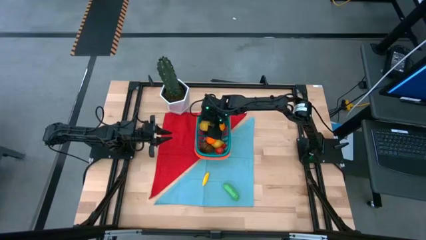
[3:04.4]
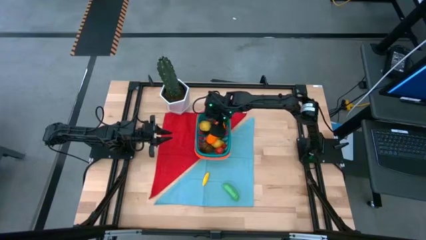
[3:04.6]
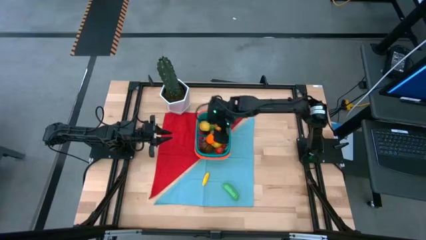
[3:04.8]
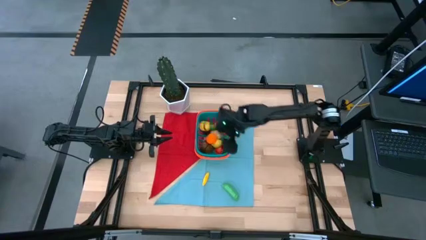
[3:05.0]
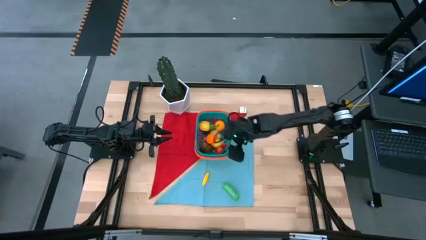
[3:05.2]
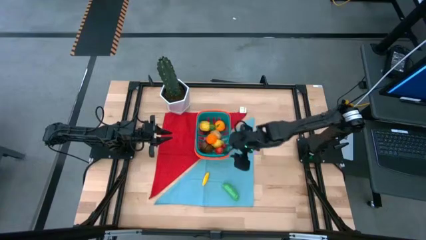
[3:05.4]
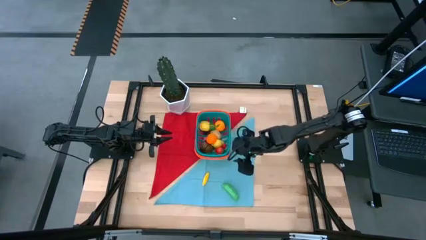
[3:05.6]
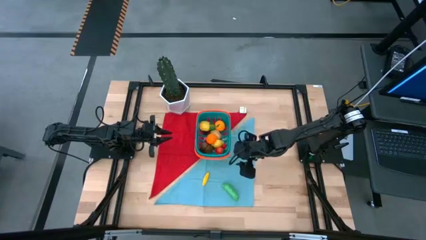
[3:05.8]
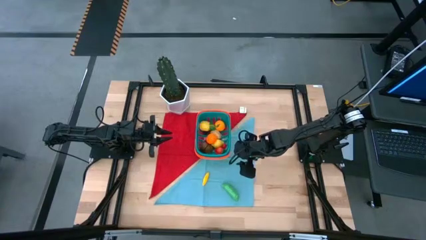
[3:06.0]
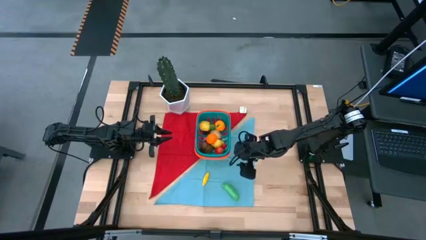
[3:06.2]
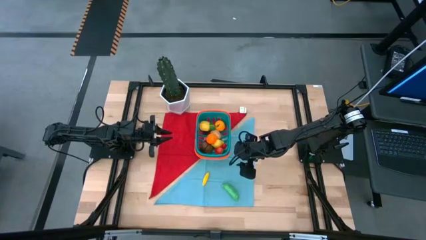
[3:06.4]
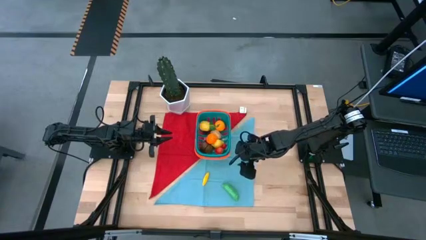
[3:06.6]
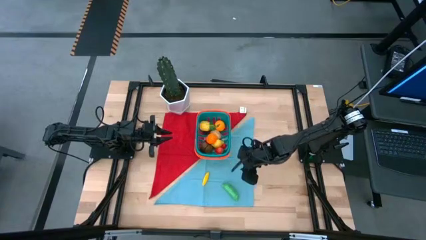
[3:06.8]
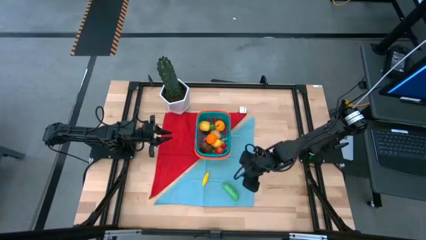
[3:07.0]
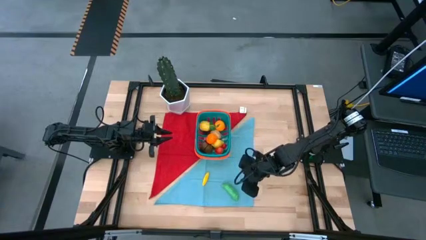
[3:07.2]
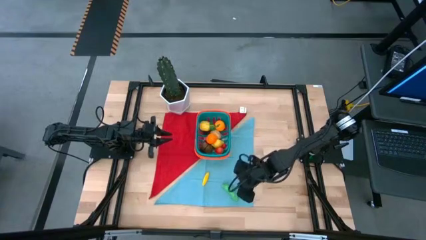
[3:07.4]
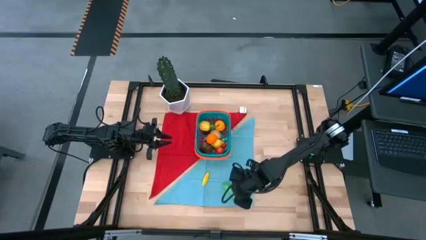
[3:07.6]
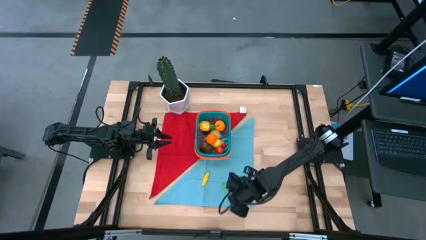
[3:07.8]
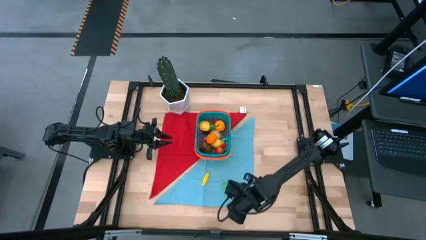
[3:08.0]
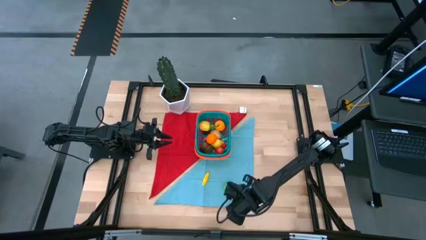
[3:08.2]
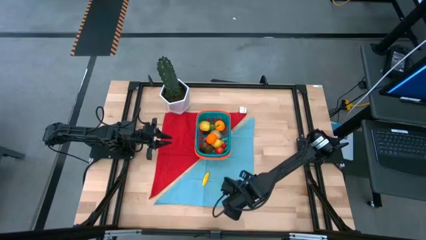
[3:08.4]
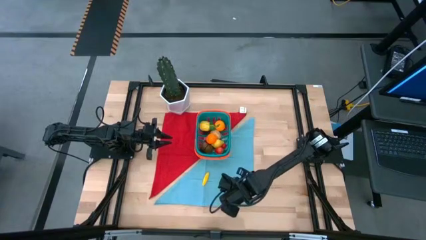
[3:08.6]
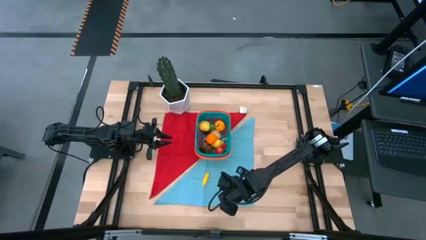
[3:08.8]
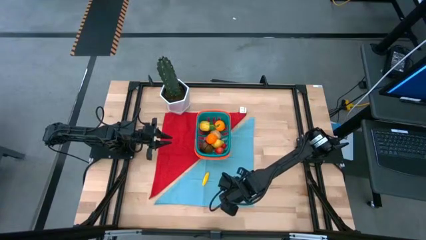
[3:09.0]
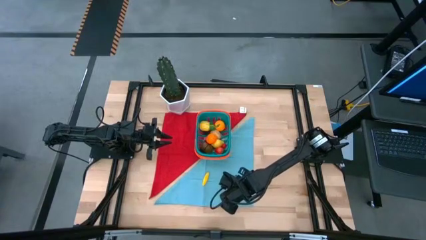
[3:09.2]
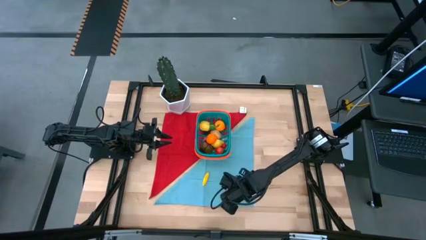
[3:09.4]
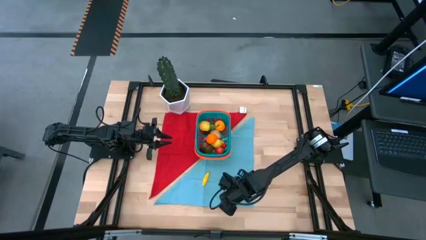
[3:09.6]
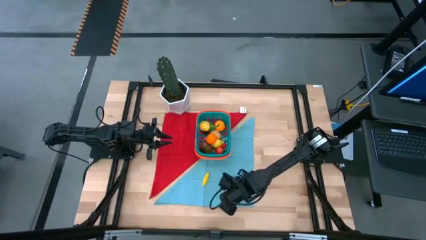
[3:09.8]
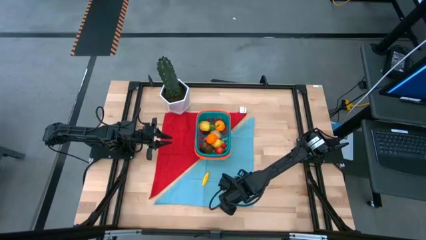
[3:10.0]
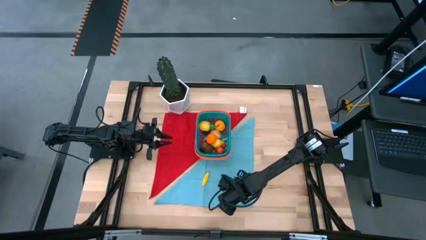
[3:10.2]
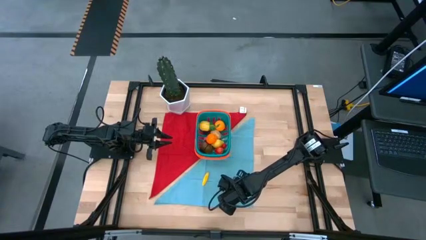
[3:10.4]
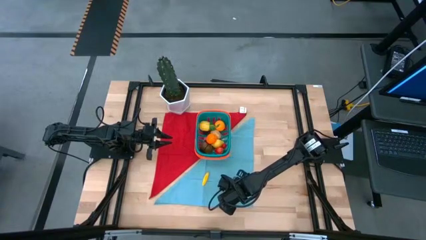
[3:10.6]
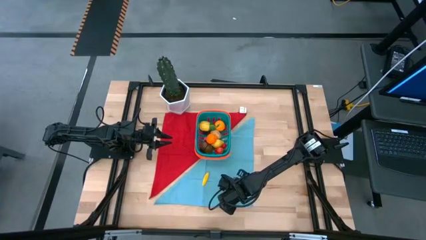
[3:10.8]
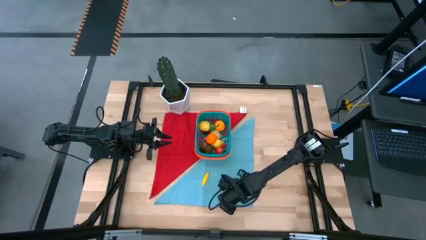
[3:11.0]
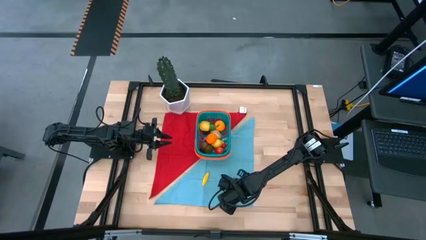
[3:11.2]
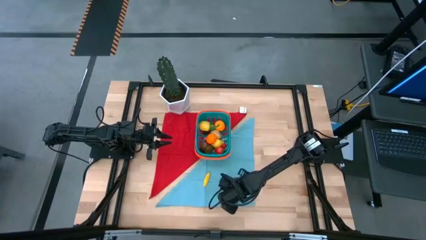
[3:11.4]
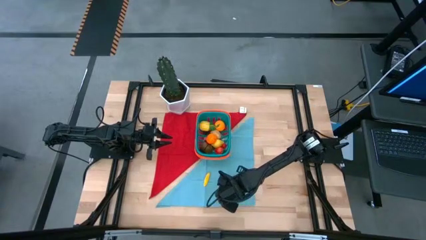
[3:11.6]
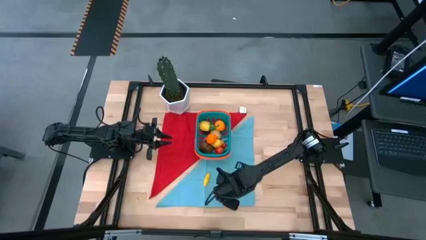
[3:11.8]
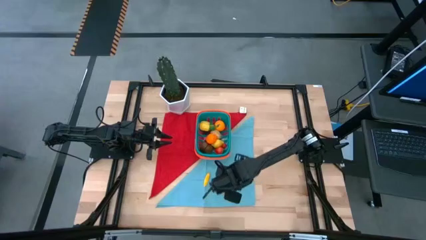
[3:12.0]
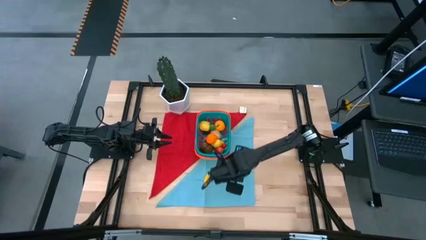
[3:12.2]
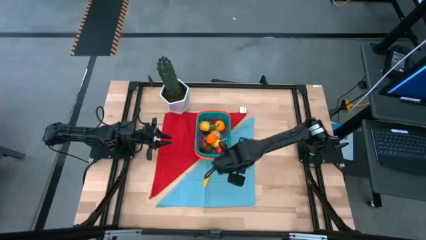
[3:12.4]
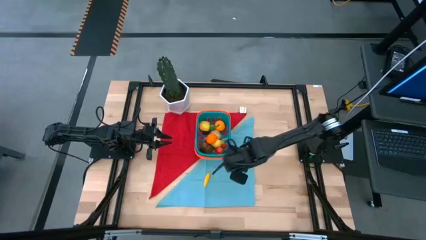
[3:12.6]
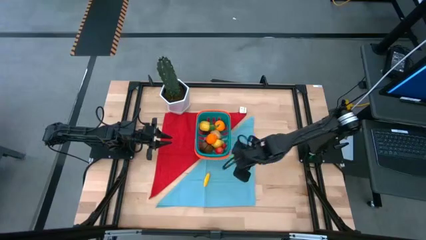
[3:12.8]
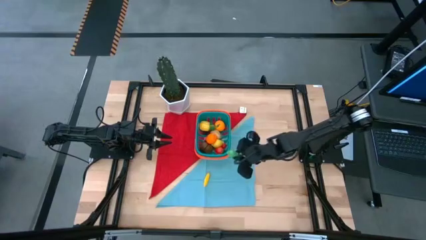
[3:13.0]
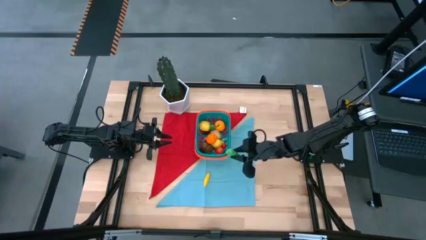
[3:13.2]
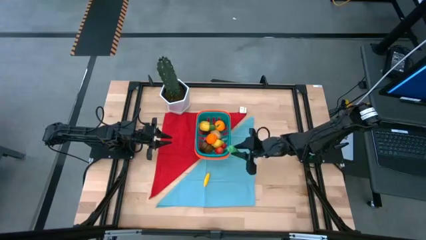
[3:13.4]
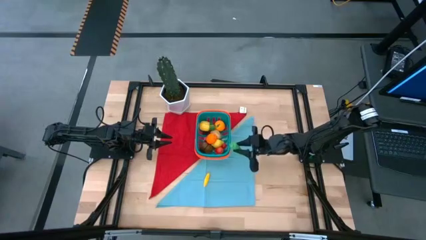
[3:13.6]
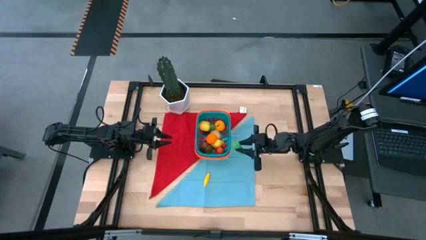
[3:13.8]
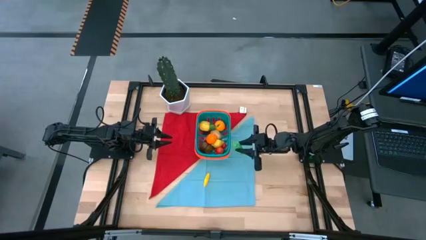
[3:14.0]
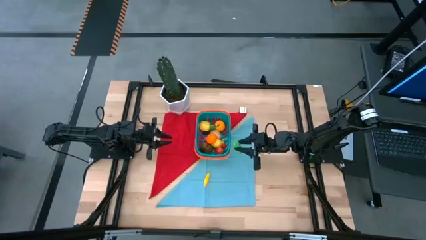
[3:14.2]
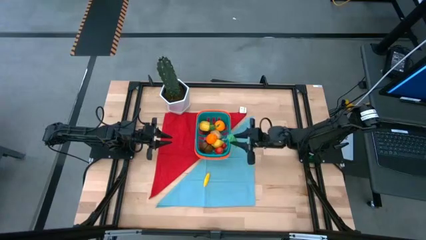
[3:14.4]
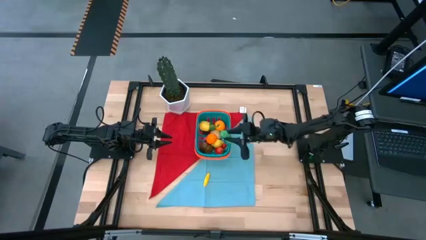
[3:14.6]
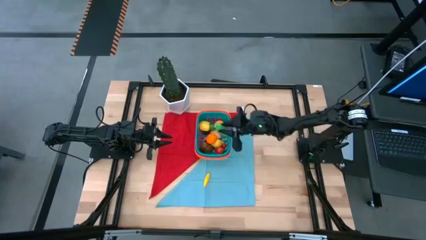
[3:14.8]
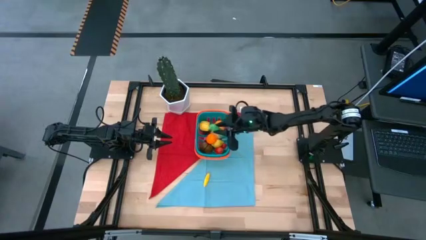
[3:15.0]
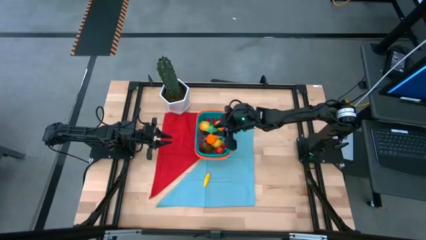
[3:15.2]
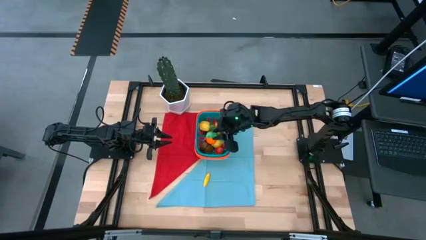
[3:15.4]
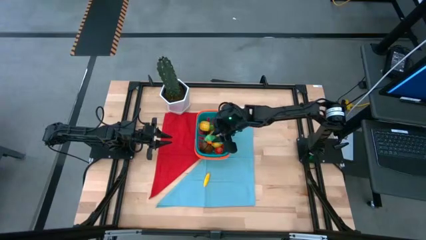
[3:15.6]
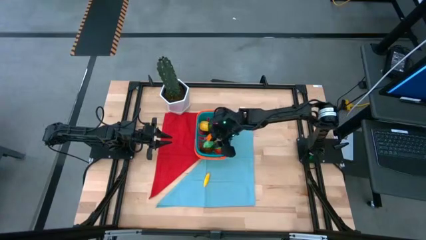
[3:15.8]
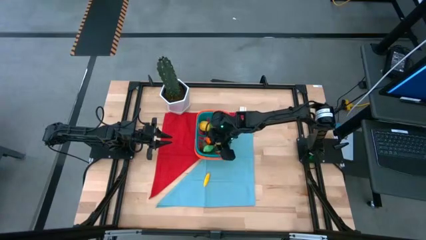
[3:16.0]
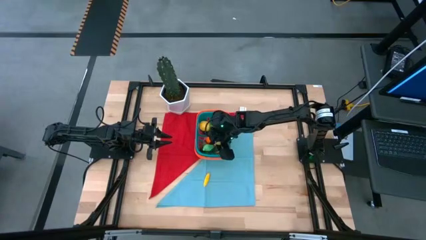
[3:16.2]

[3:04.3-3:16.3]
Task: Pick and placing Produce into tupperware
Put the pea into the basket

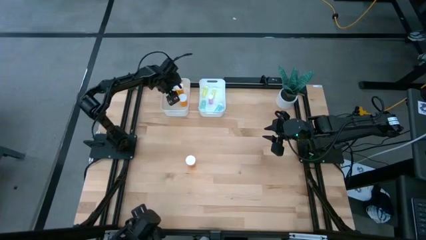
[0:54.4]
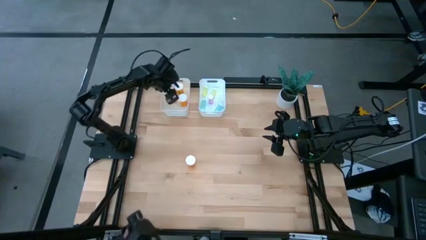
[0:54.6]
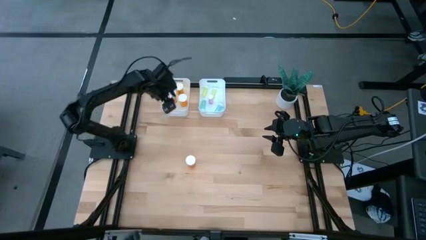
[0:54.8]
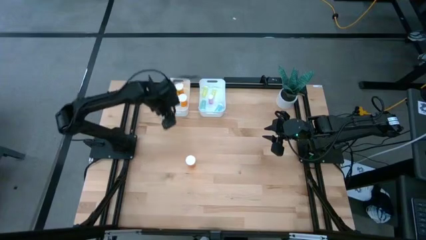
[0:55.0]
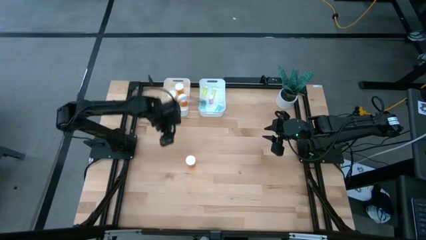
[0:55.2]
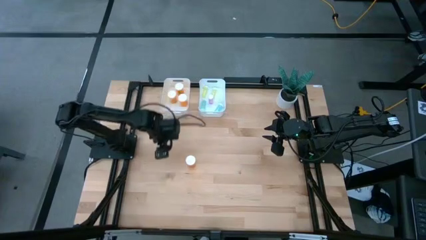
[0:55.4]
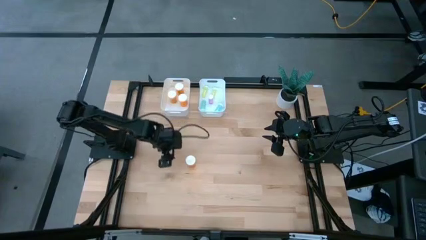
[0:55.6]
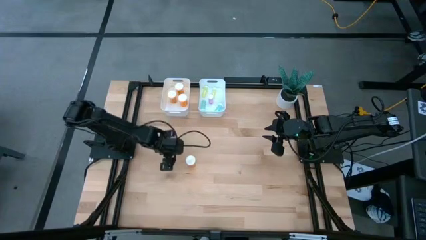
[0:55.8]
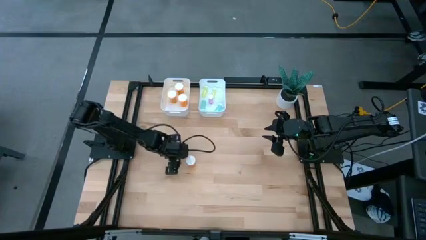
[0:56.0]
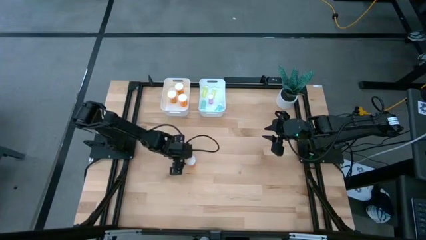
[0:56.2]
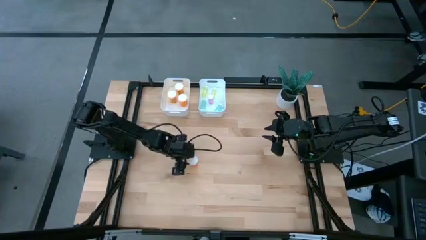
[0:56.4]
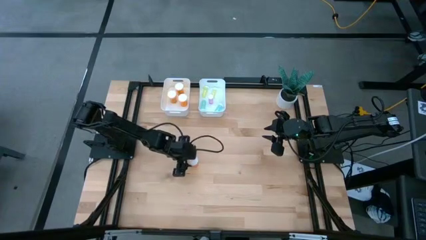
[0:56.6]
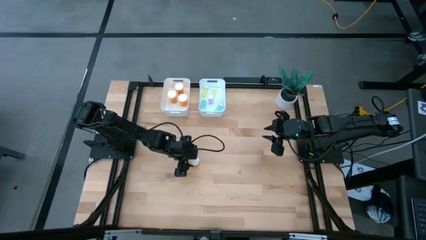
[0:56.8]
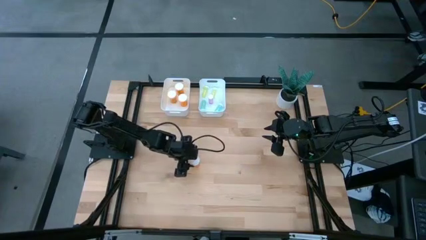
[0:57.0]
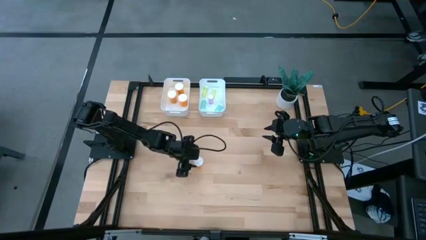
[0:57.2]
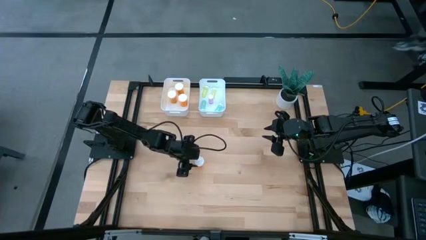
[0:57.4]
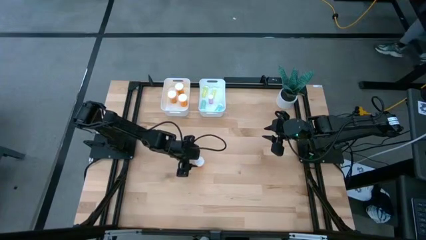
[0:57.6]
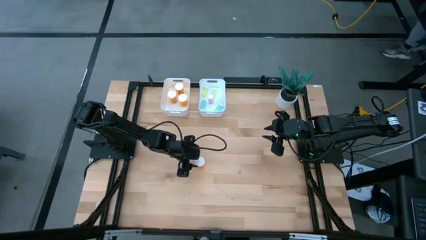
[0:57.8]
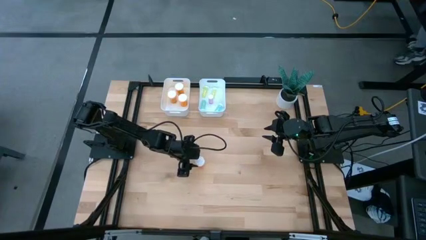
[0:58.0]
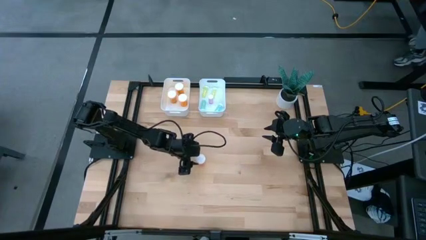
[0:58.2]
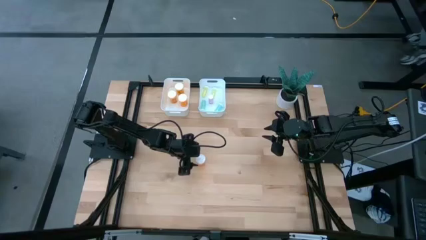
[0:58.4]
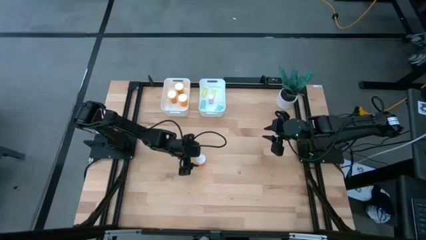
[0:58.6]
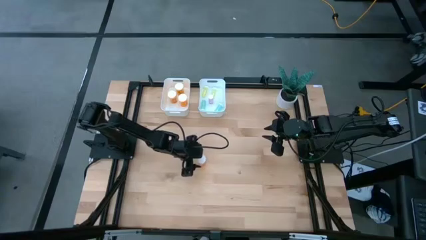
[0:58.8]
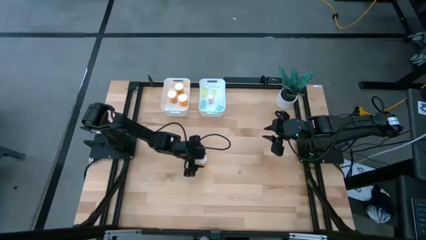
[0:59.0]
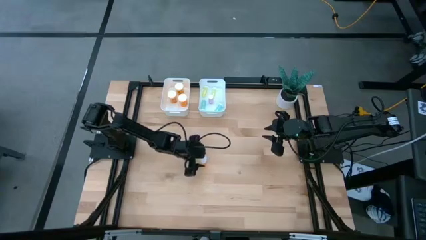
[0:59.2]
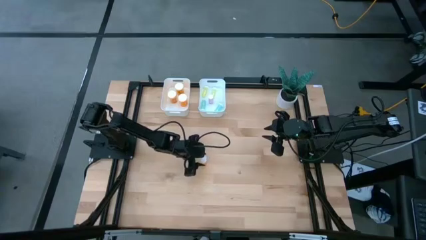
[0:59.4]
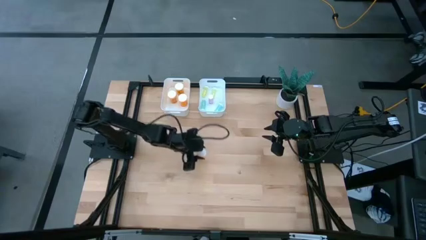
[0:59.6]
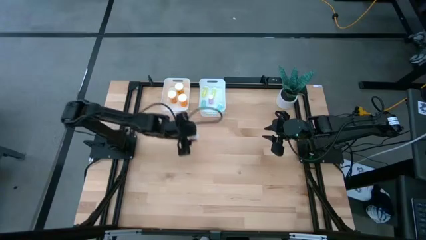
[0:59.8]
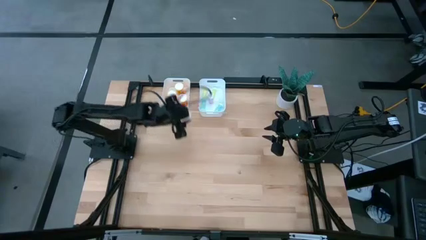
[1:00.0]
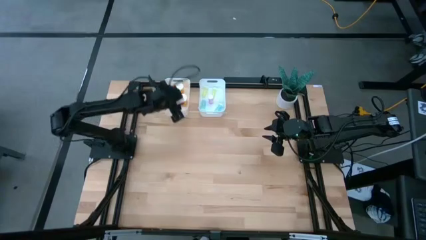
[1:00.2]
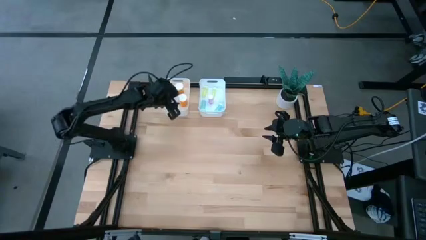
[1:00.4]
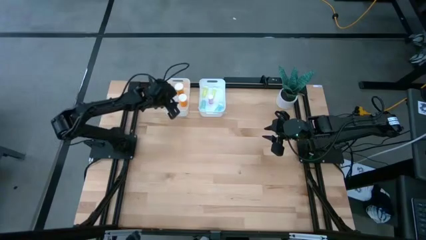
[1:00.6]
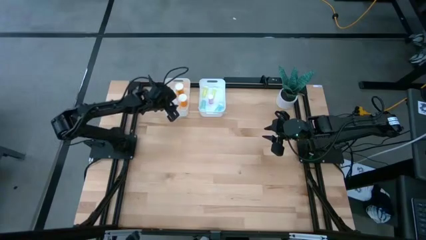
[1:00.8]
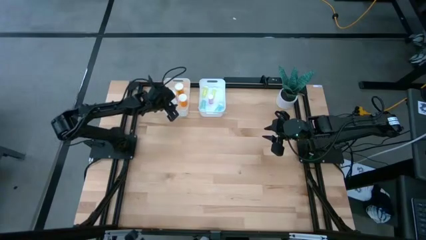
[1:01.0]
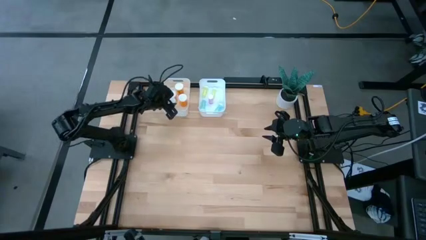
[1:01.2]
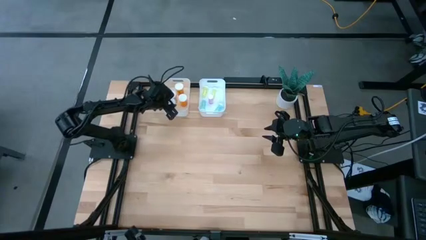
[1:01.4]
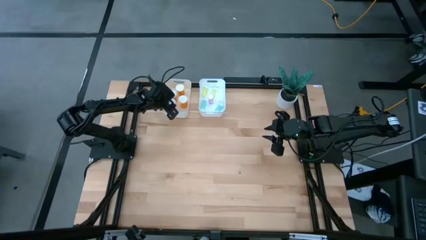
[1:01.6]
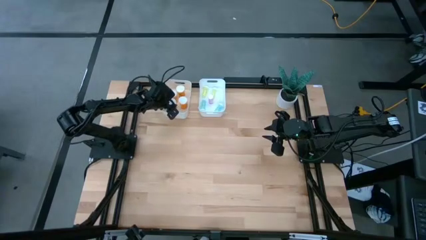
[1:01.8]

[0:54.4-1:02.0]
Task: Pick and place medicine bottles into bin by pill shape (circle, oval)
Put the large orange pill bottle into the left white bin
